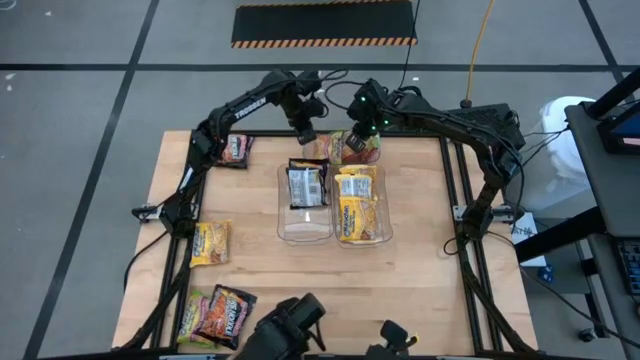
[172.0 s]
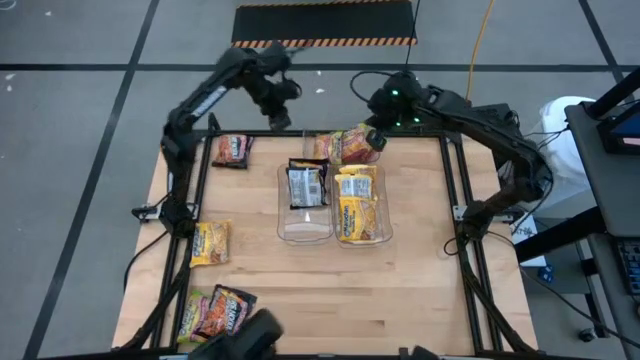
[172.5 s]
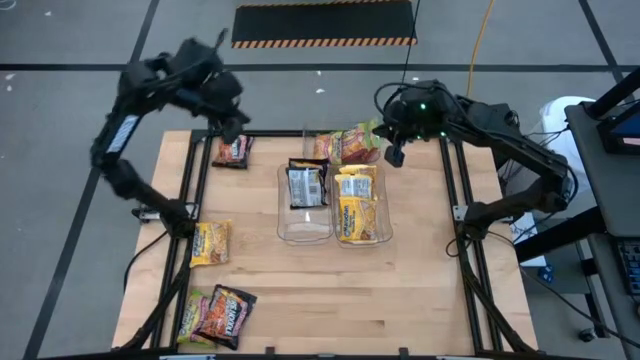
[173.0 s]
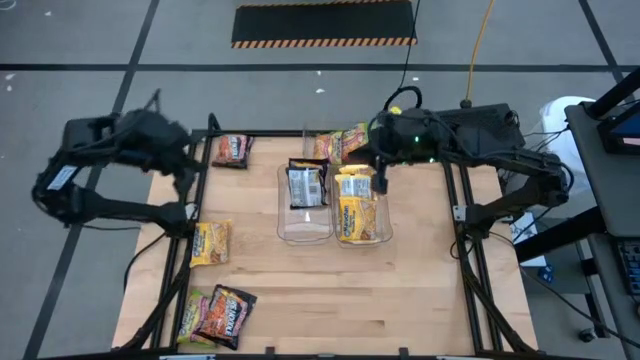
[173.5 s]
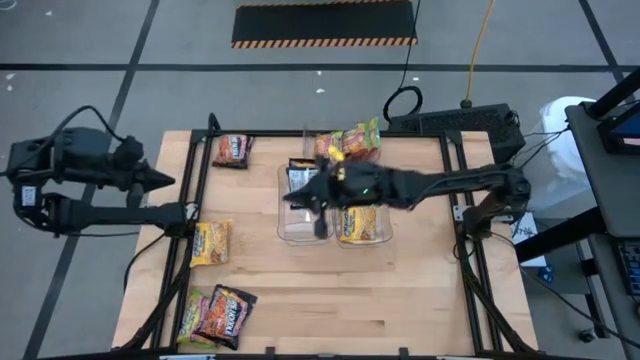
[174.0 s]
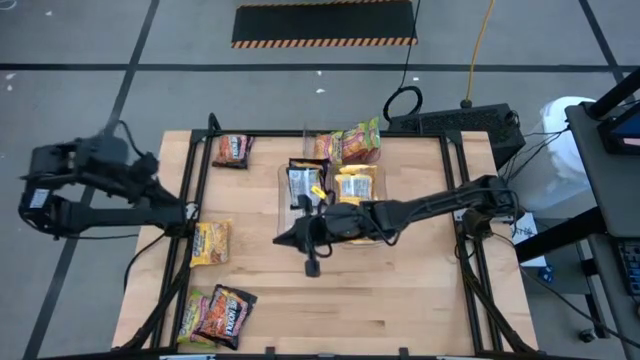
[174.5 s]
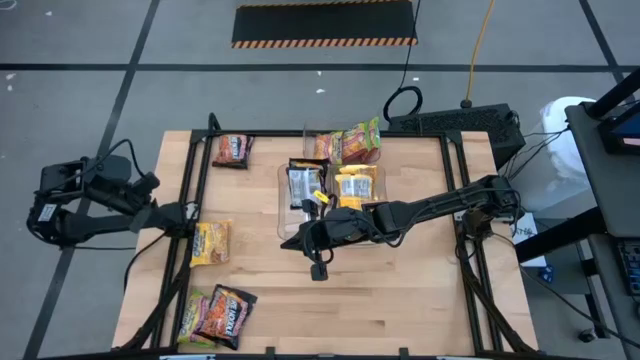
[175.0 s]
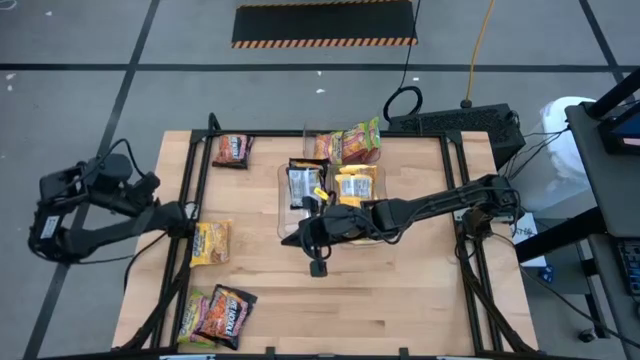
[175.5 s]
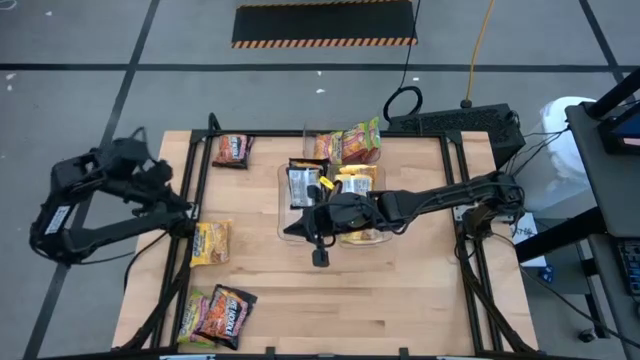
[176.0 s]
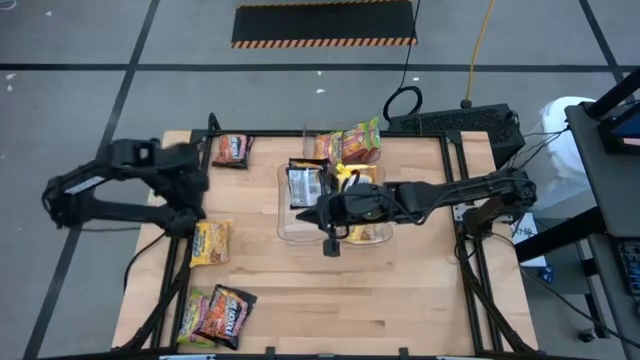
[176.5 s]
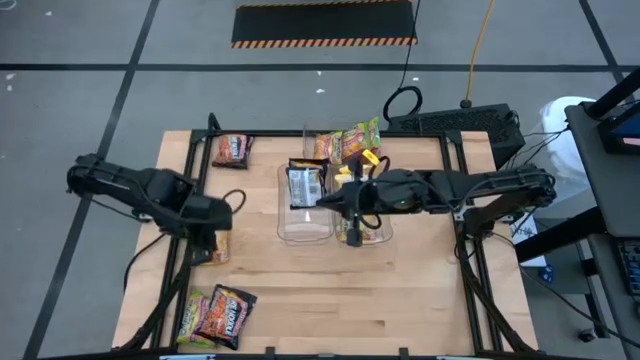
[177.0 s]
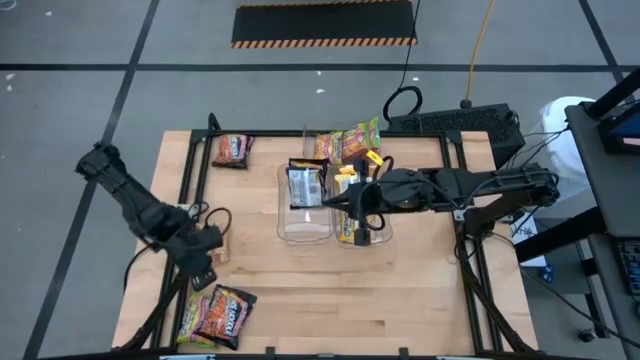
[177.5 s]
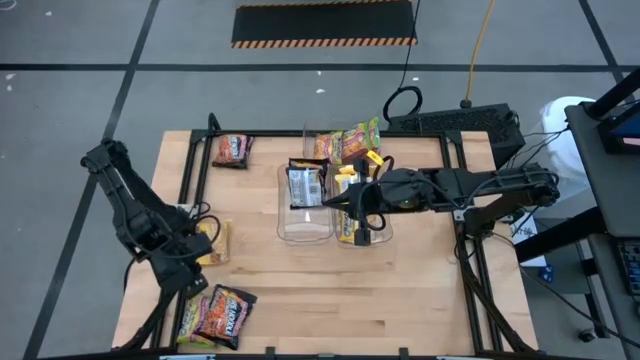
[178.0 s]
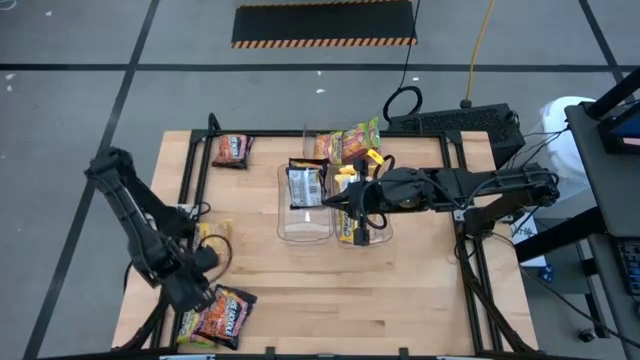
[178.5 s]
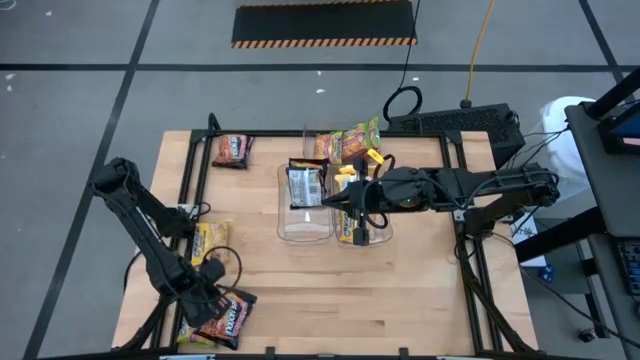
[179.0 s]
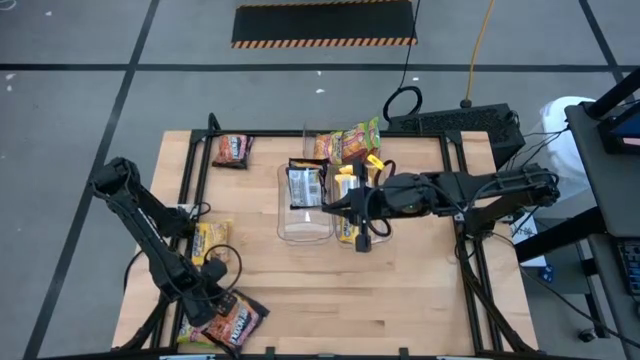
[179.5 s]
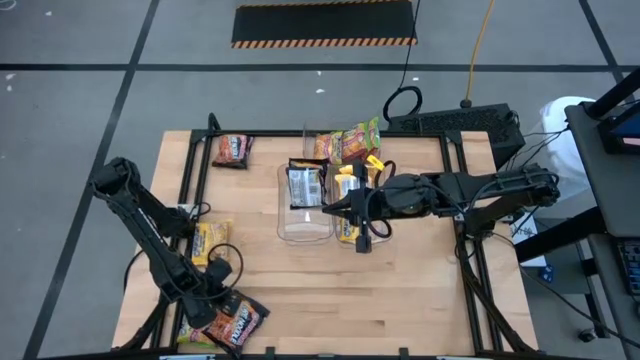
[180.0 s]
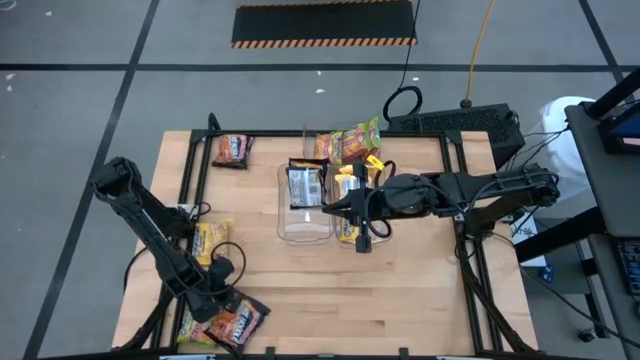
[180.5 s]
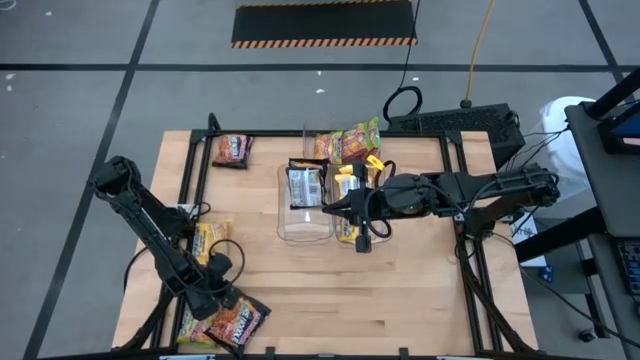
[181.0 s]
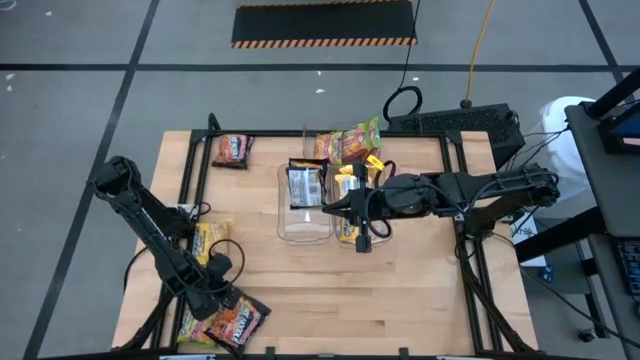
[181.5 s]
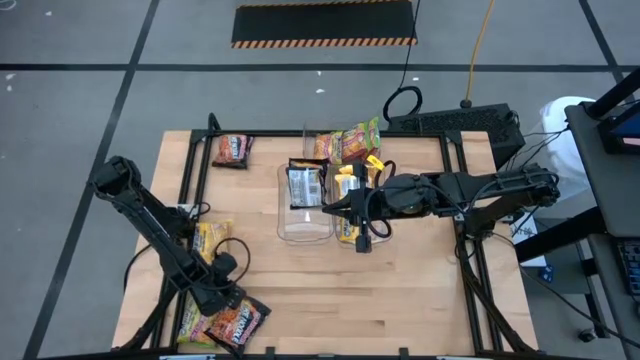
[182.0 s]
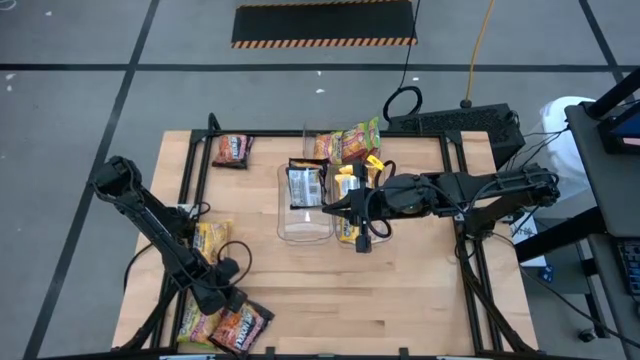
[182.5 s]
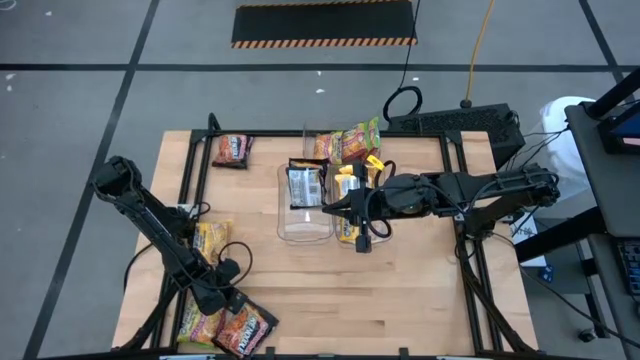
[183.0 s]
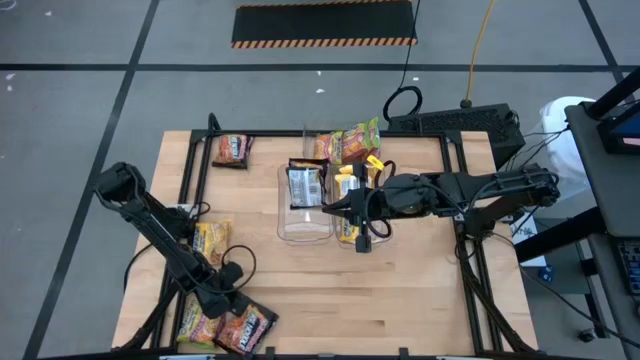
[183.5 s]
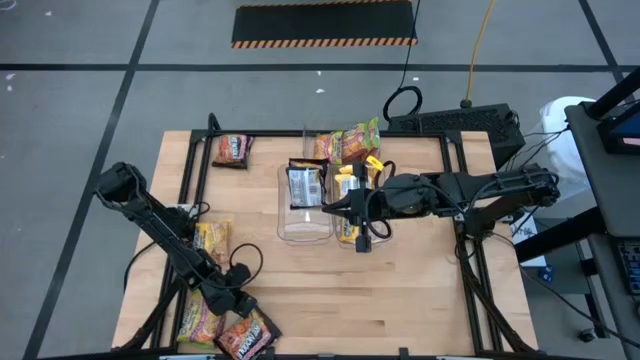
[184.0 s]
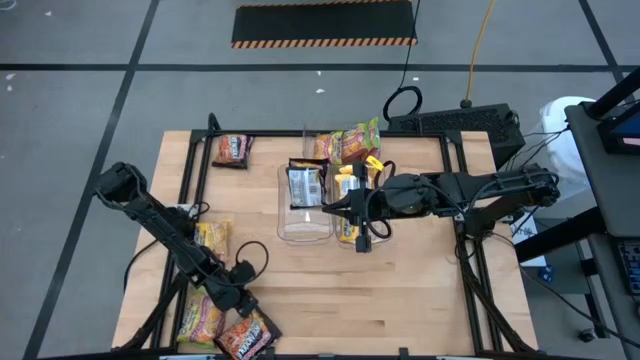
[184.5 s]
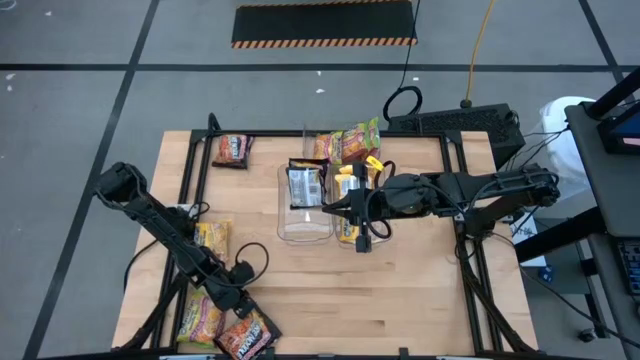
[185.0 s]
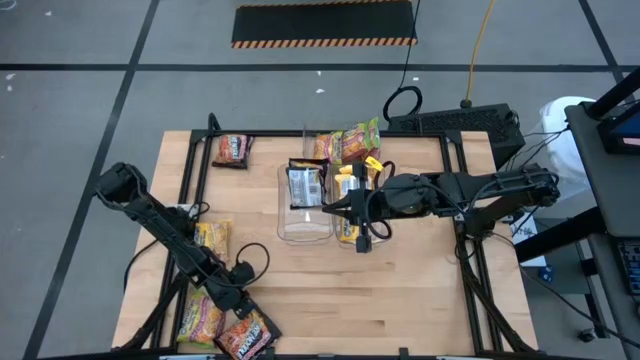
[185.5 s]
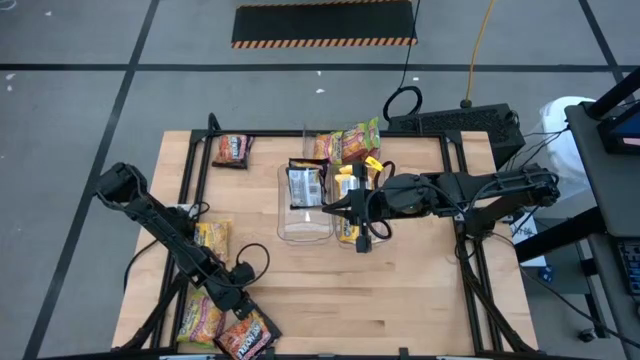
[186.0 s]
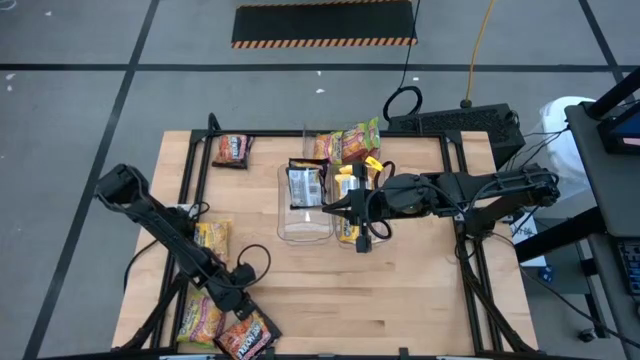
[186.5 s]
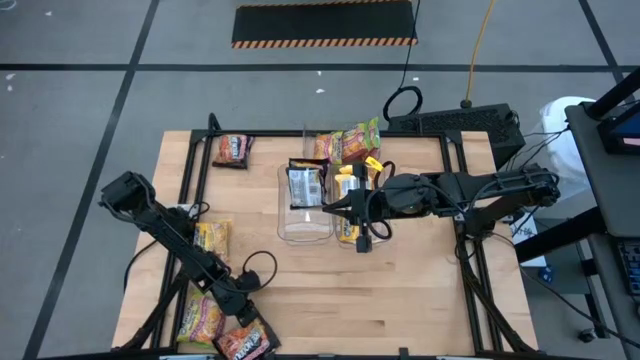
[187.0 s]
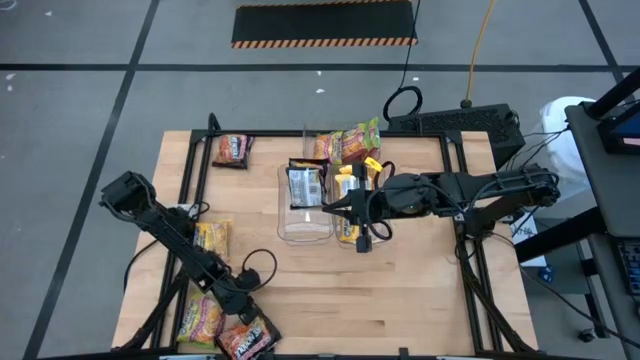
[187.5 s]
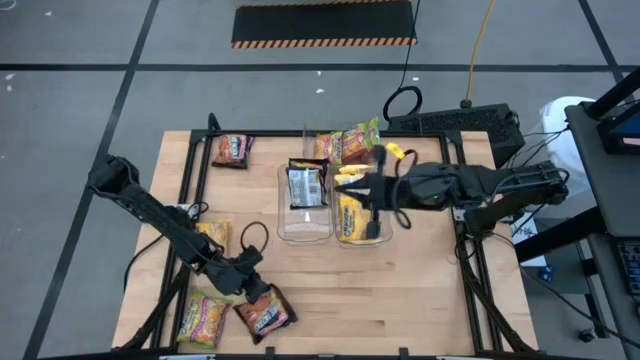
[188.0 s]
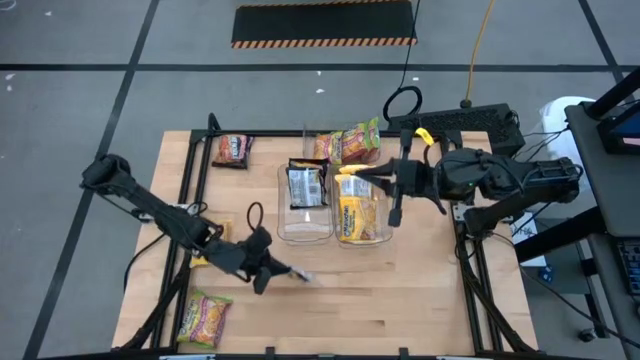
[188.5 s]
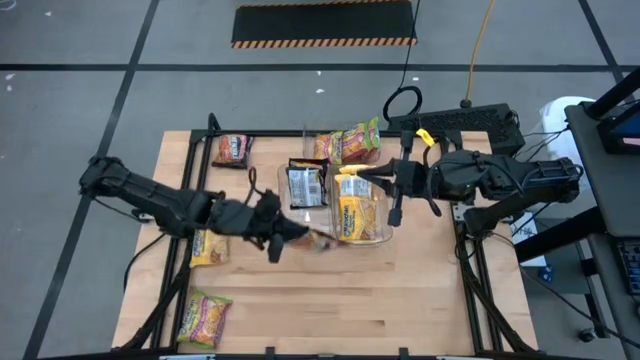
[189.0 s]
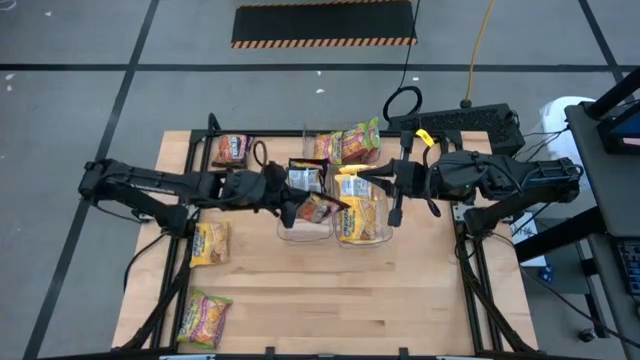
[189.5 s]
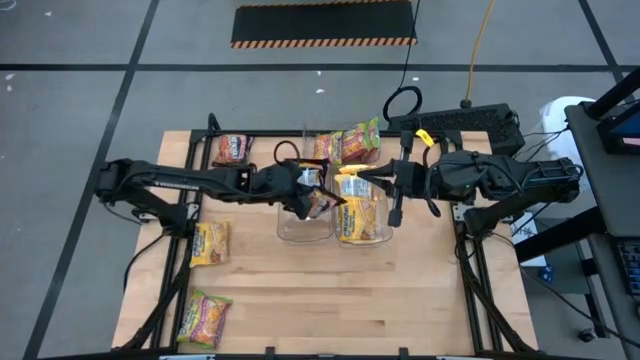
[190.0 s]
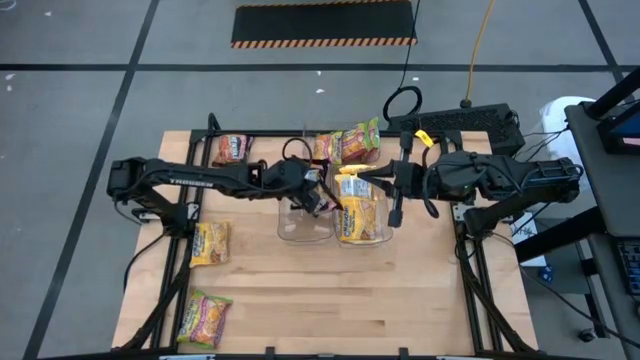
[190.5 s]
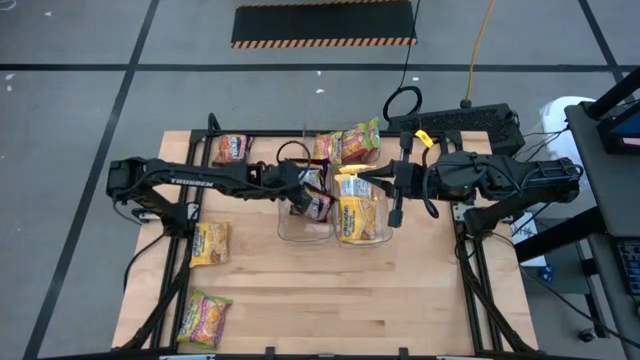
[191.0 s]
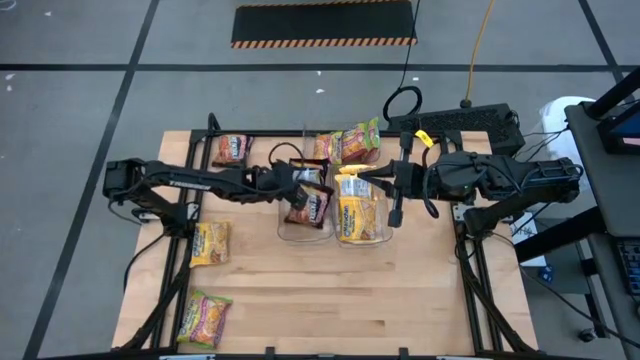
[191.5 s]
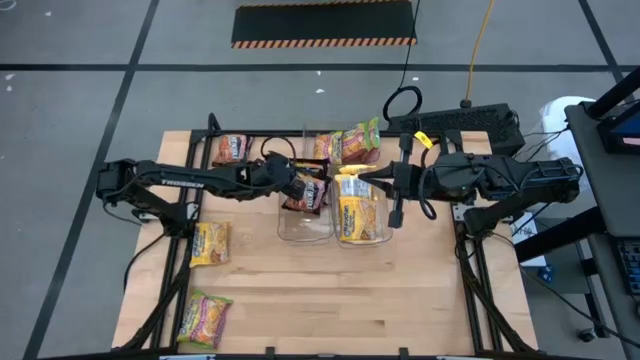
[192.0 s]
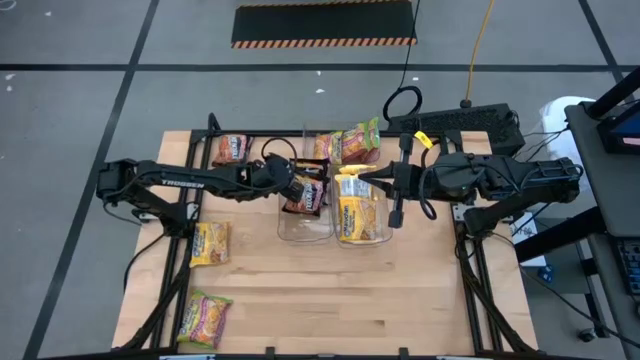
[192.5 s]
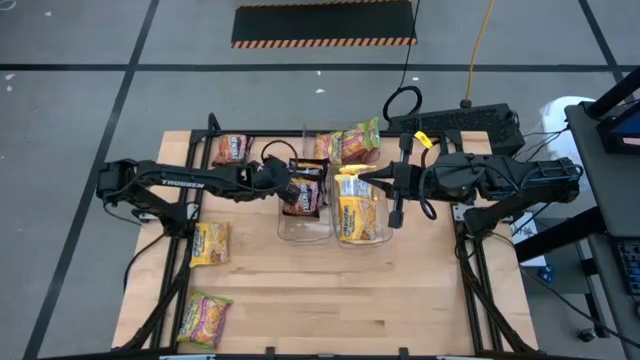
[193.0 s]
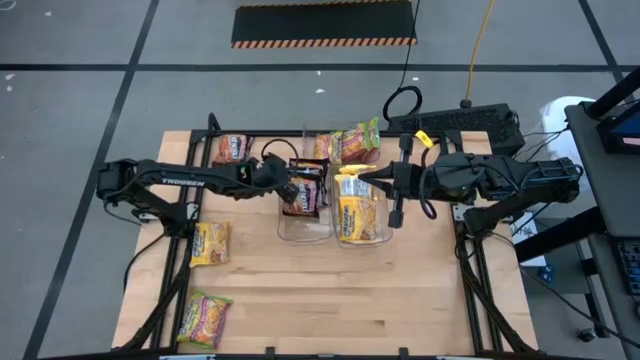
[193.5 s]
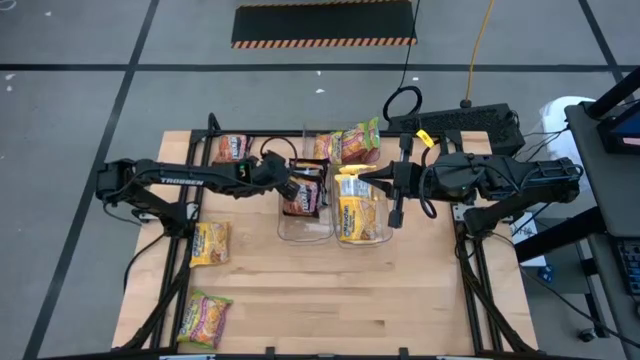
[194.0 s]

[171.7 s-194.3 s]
Task: Sort Maruchan noodles
Put the black noodle pack into the left transparent bin
